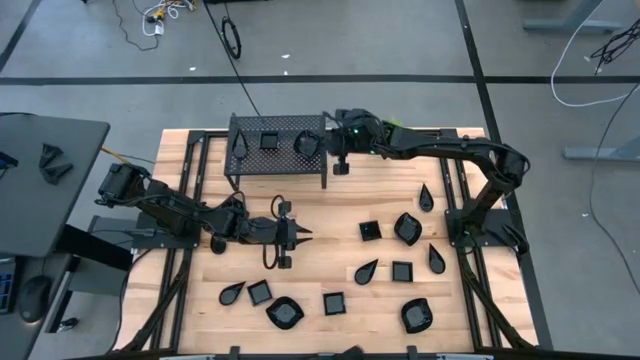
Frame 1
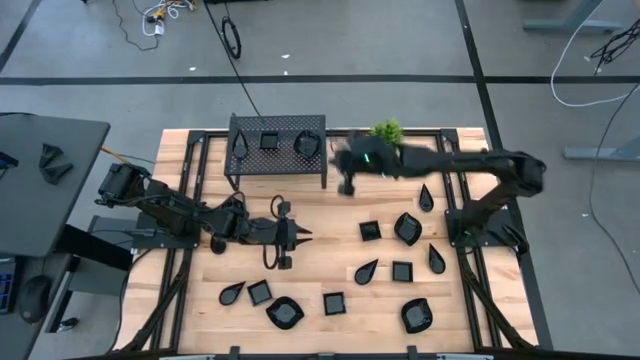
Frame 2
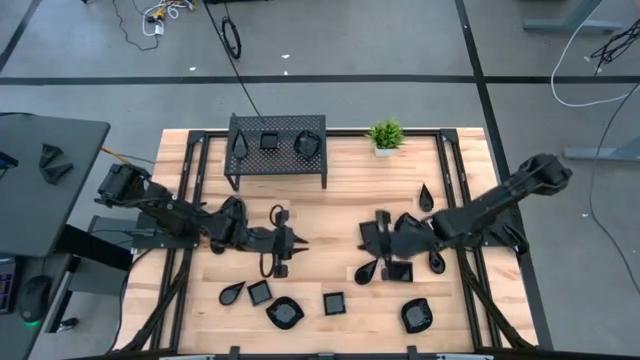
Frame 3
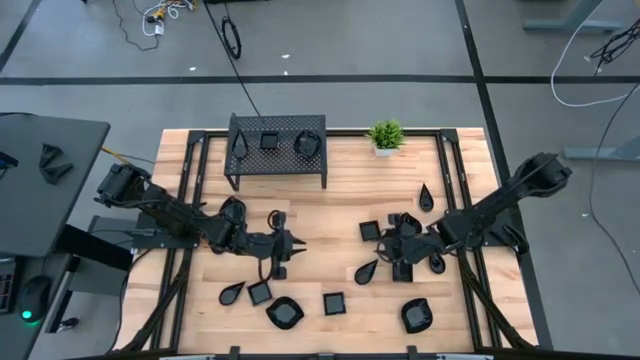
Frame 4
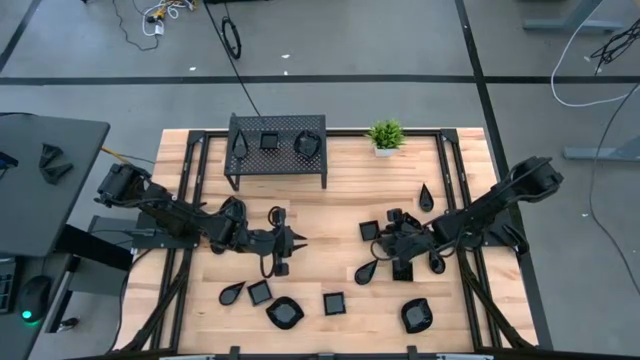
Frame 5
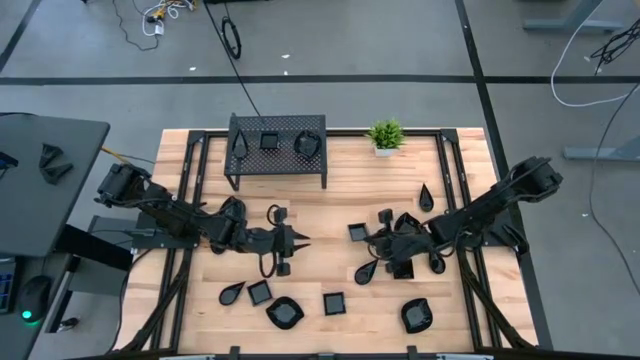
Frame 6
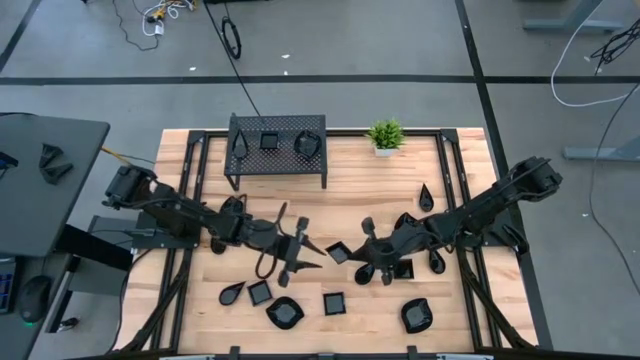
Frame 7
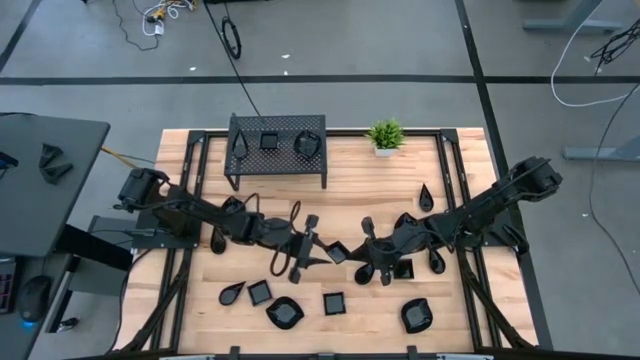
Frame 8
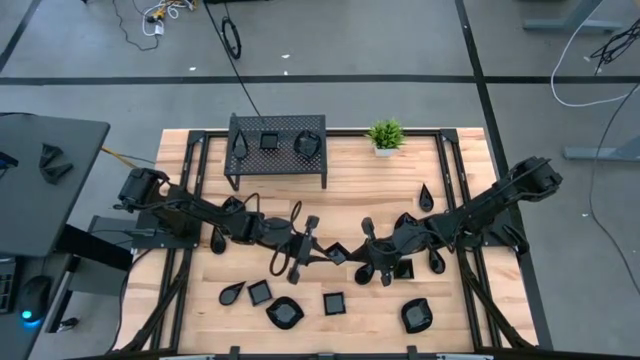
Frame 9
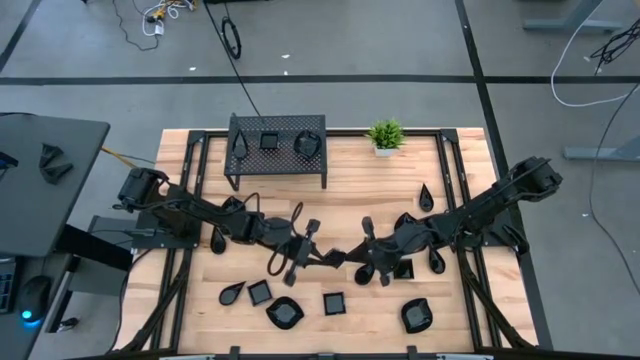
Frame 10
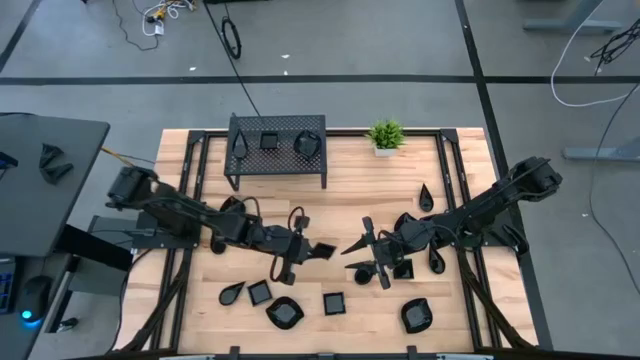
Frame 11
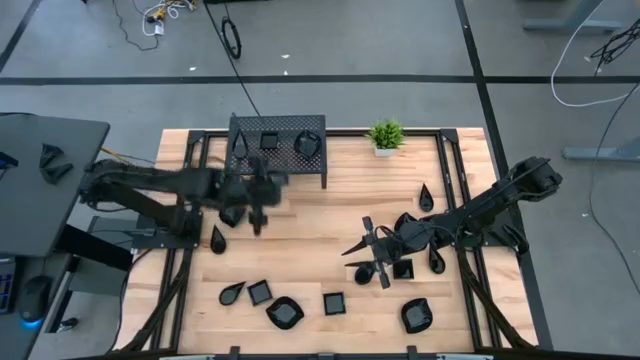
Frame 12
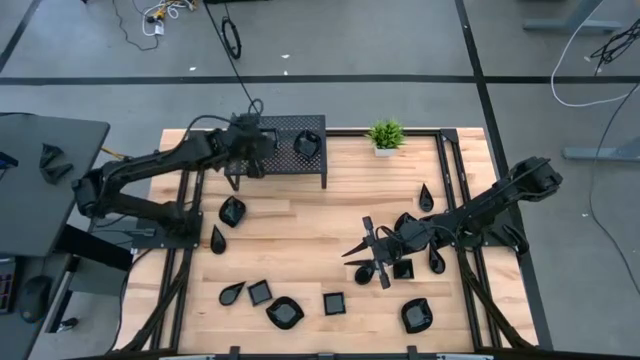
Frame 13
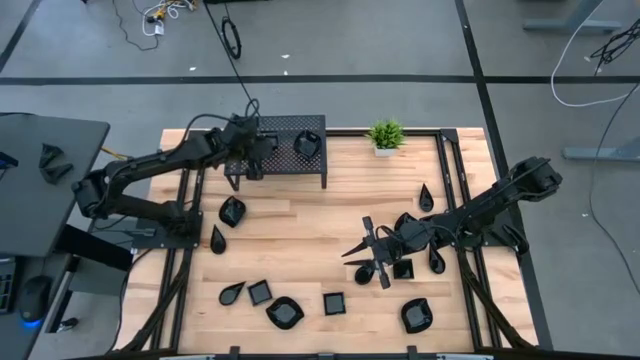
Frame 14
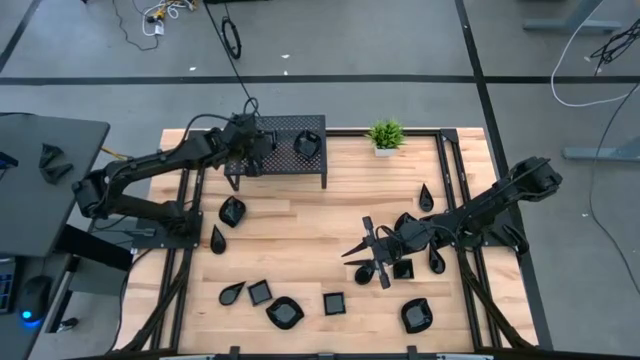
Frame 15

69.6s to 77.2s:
Task: Pick & Place Mini shaped plates
Stack the black square plate on top of the black square plates on the shelf

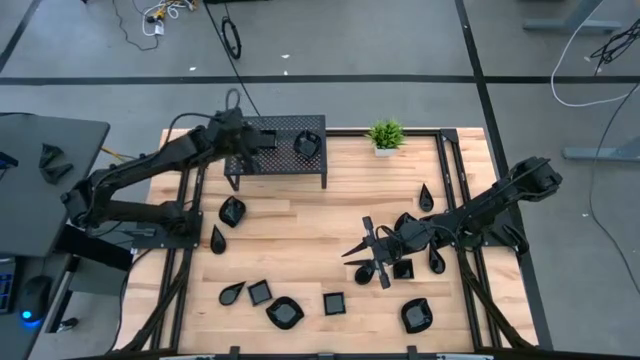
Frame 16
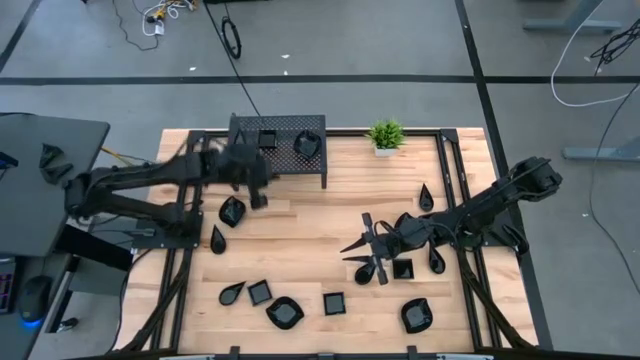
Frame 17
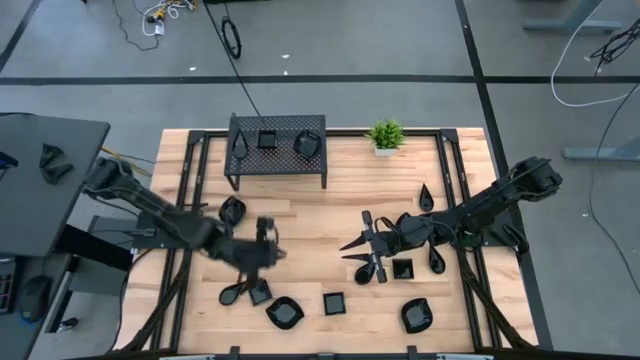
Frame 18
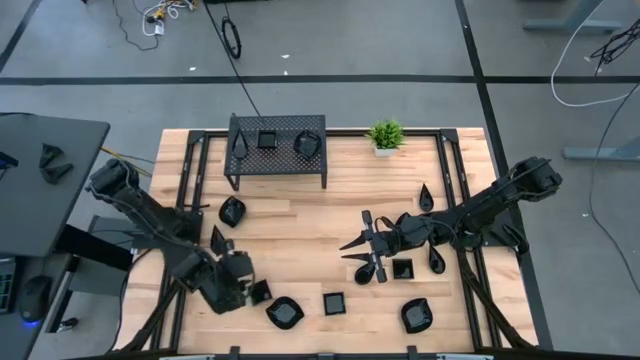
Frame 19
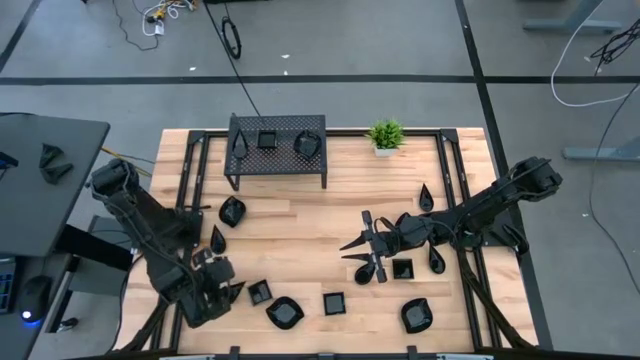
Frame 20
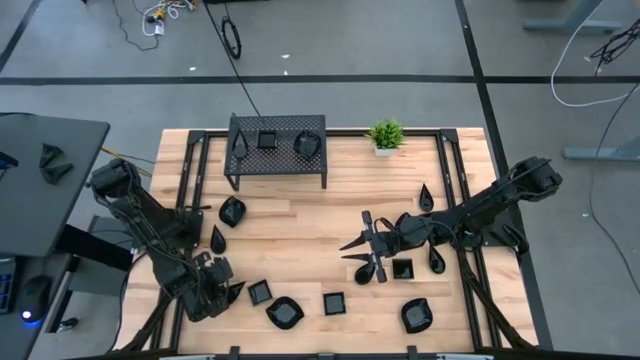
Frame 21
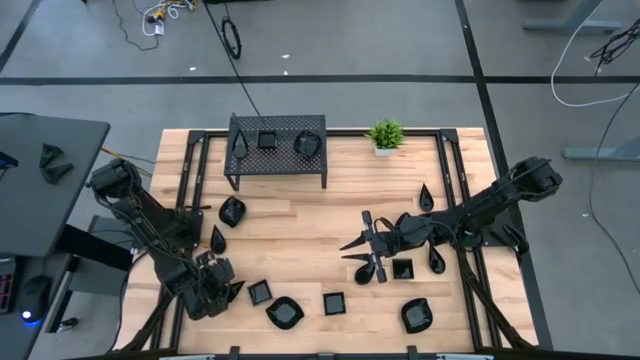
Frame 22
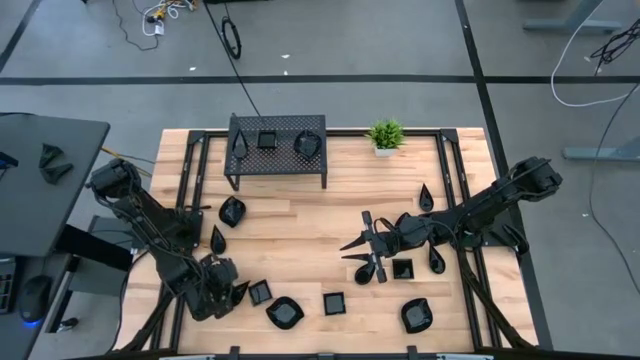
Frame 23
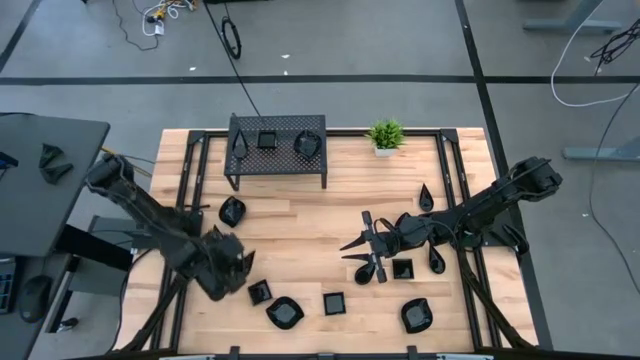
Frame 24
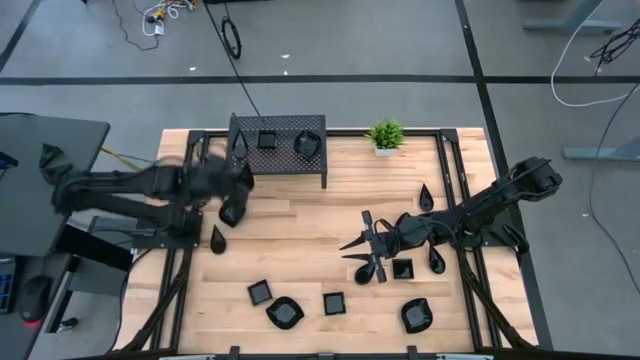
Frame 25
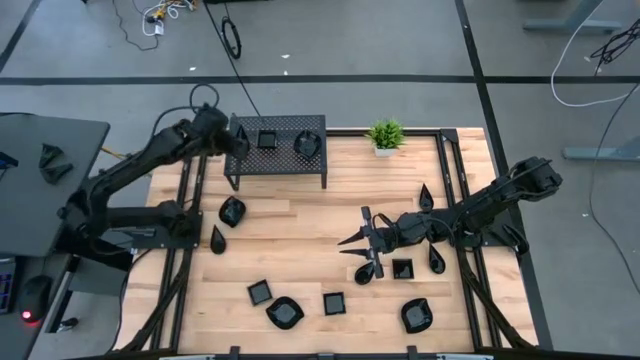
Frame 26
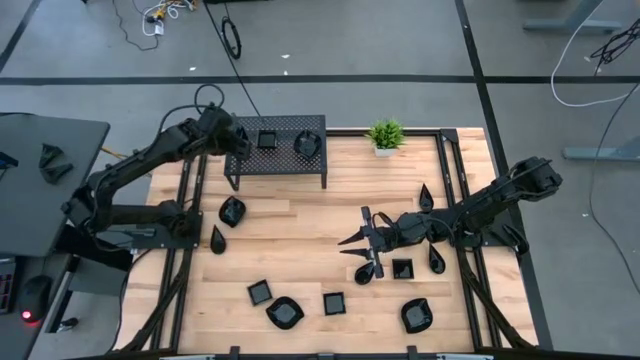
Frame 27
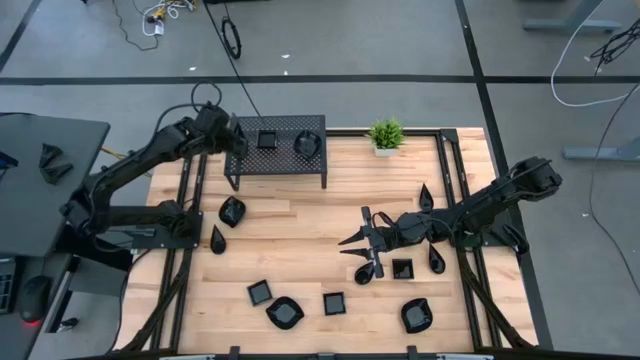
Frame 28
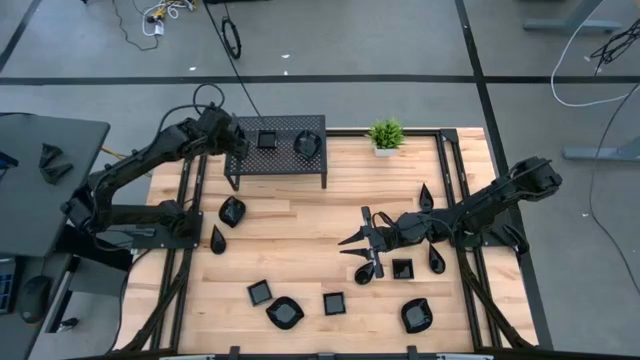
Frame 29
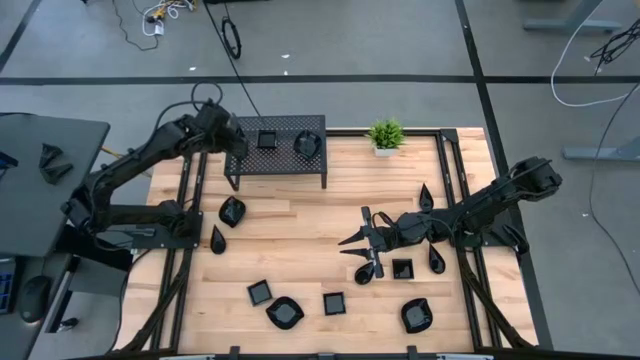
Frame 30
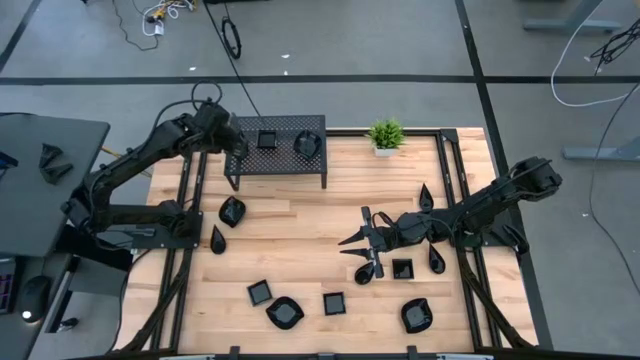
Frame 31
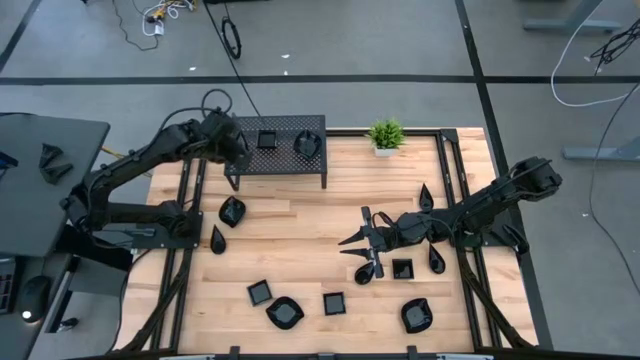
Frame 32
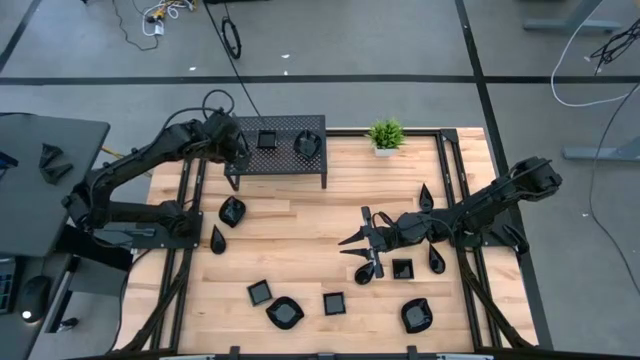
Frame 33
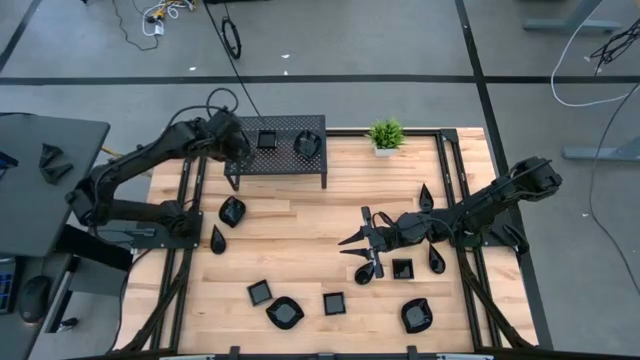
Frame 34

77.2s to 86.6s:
Stack the black drop shaped plate on top of the black drop shaped plates on the shelf

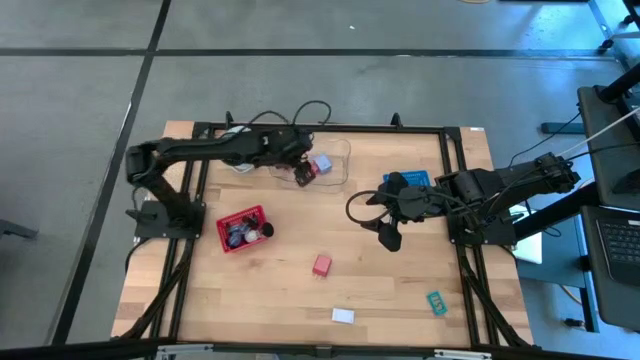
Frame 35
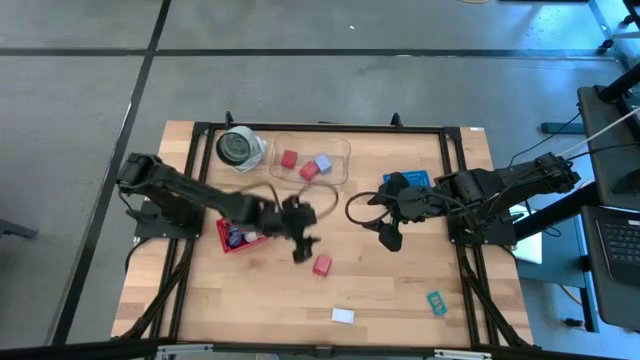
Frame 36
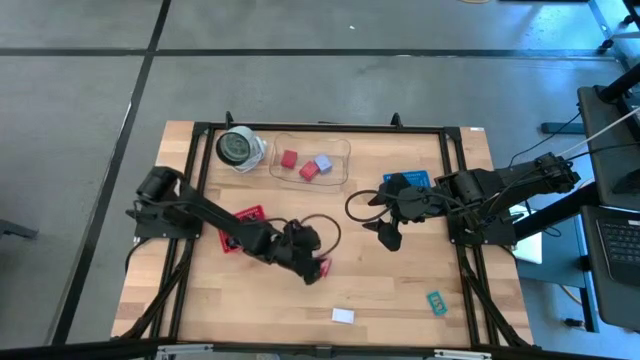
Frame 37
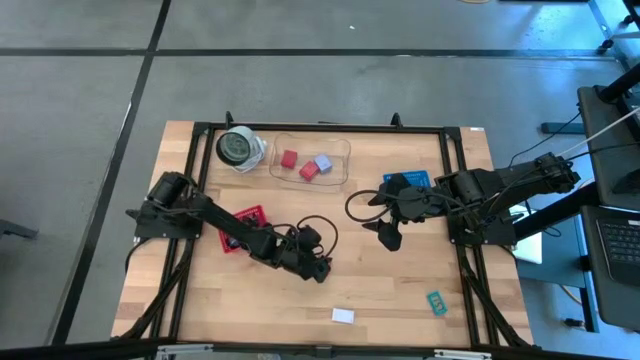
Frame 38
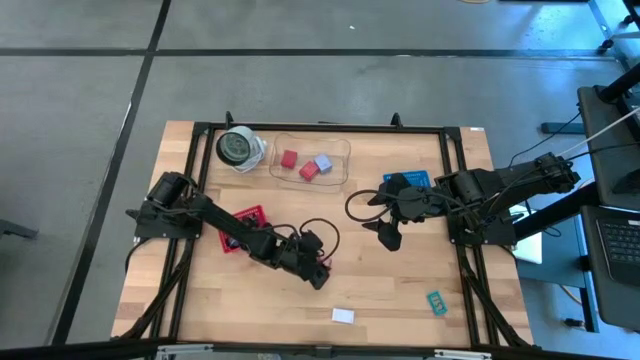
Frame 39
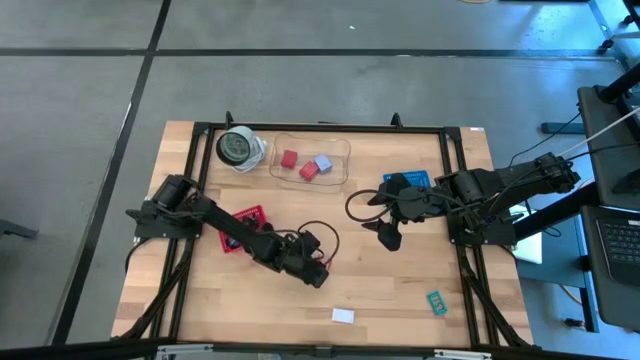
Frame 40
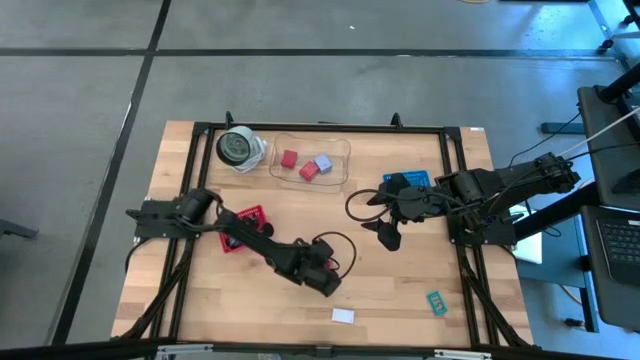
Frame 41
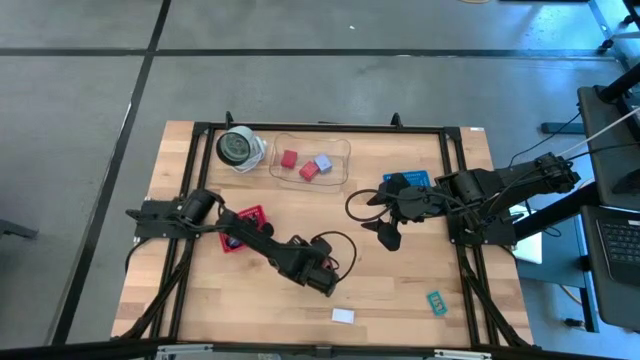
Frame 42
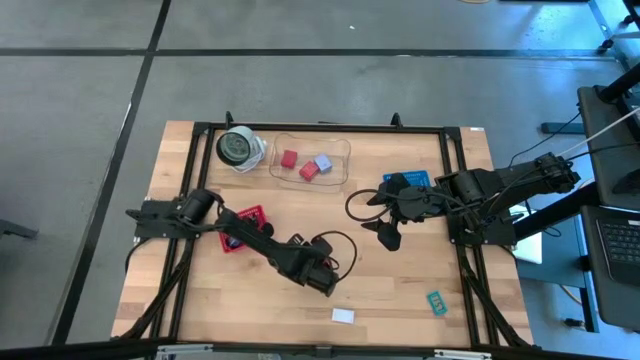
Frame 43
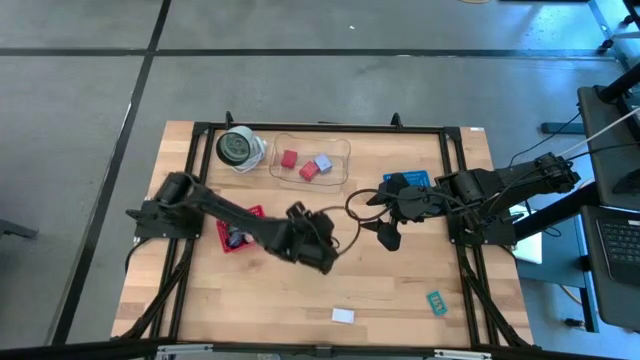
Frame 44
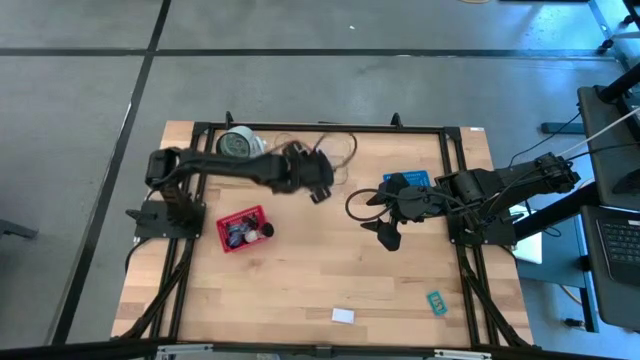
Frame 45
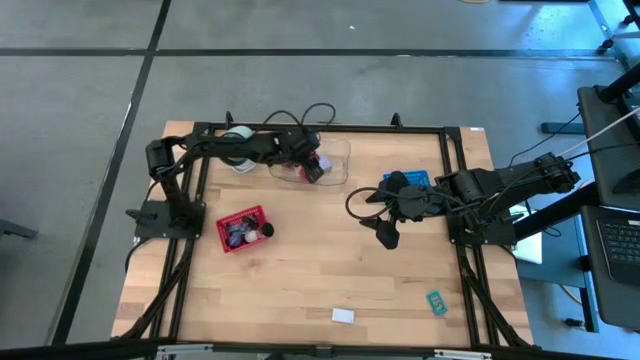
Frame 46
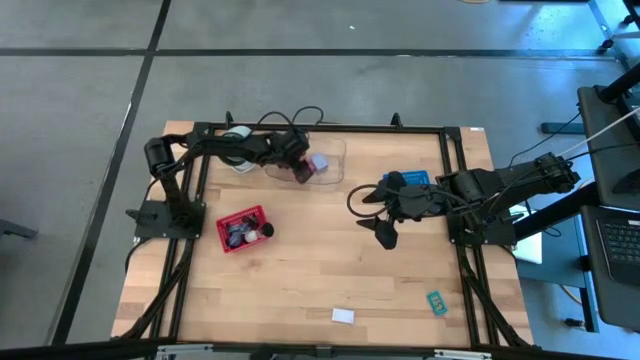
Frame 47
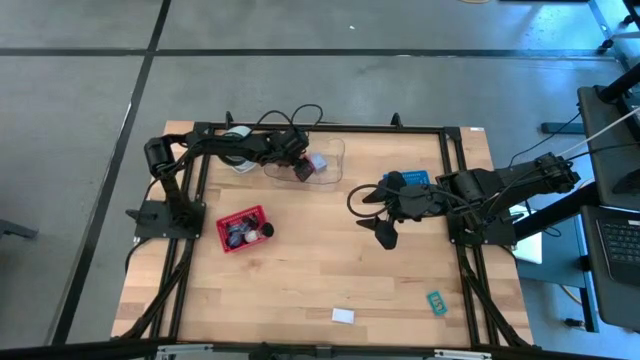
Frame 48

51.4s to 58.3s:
Task: Pick & Place Office items
Put the red charger adapter into the transparent bin
